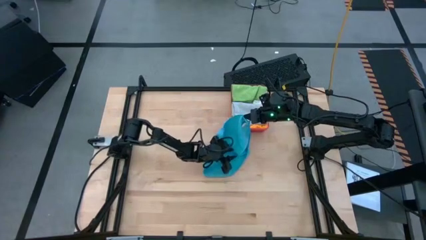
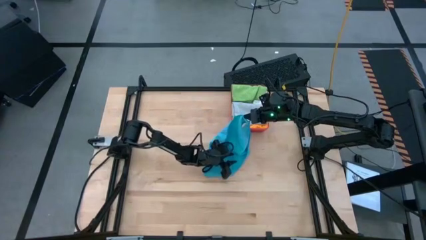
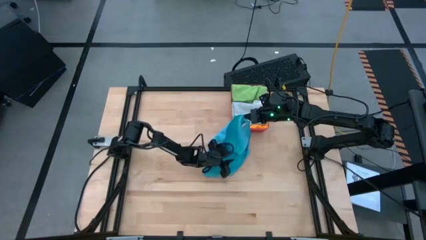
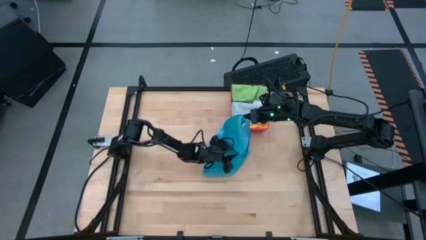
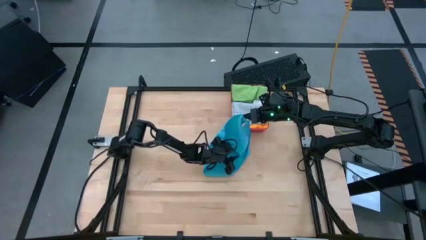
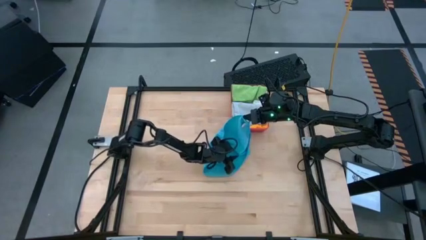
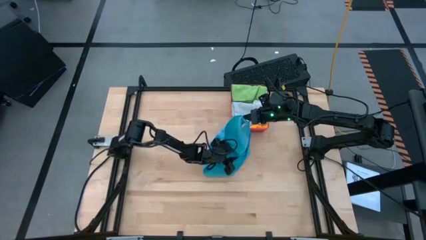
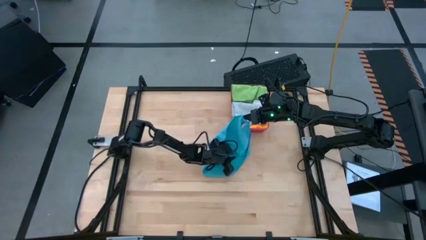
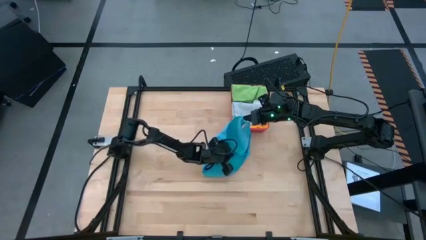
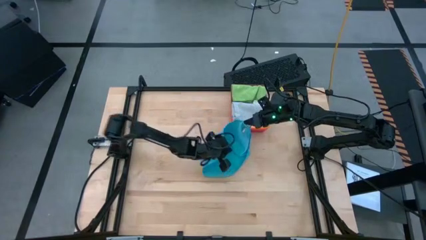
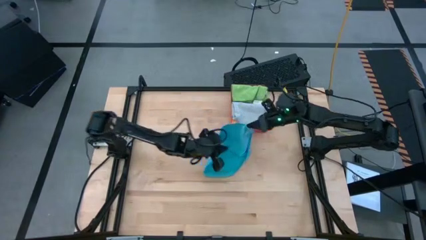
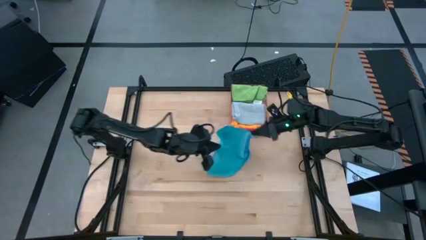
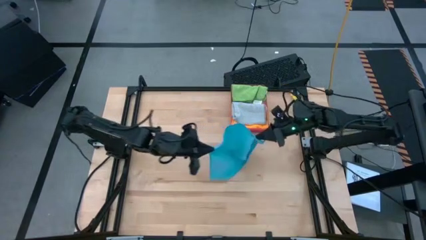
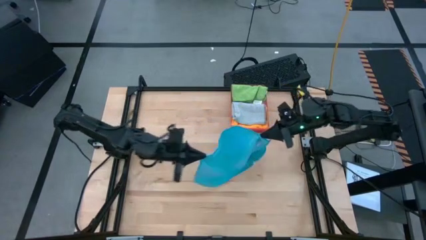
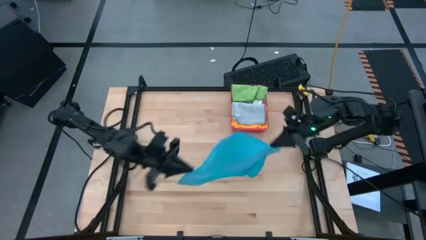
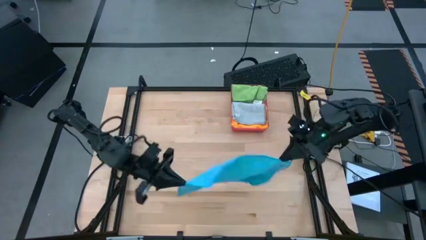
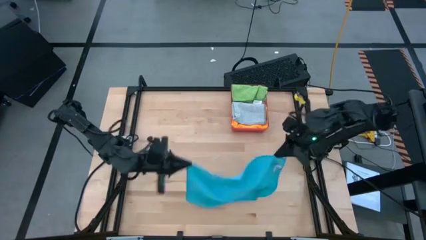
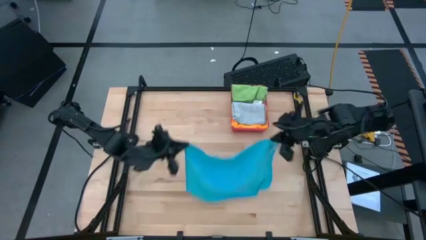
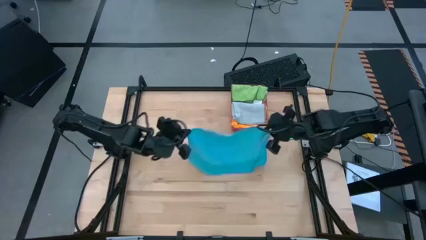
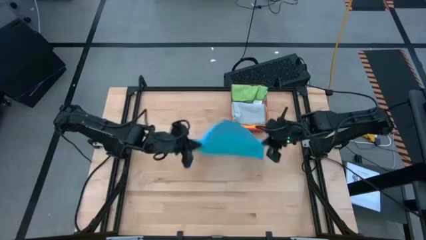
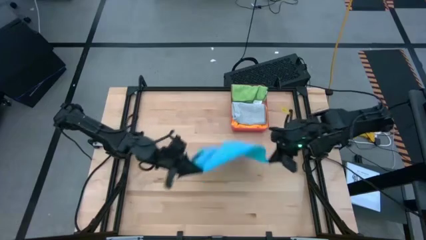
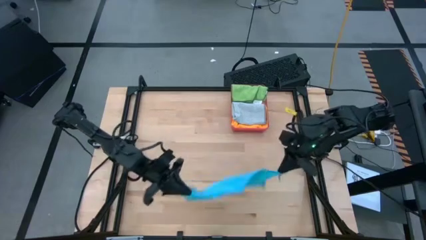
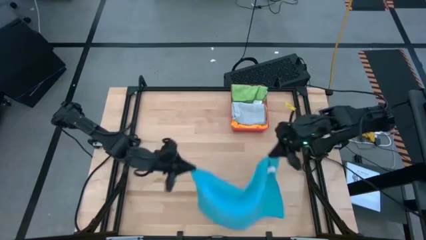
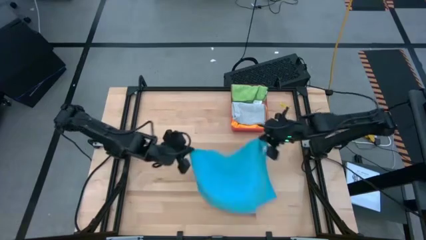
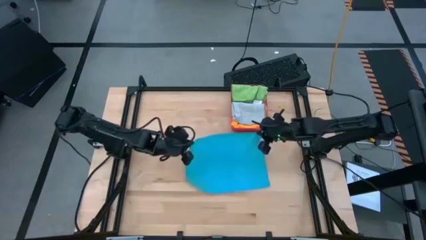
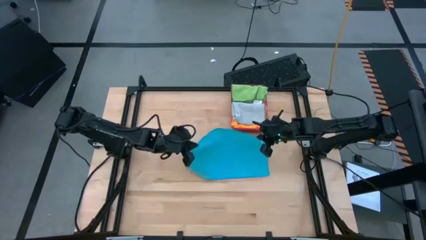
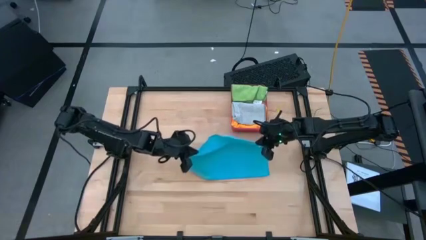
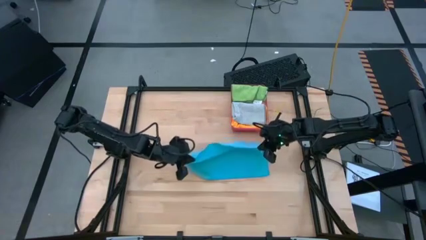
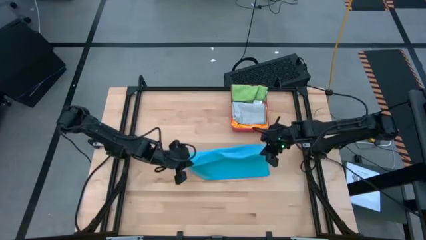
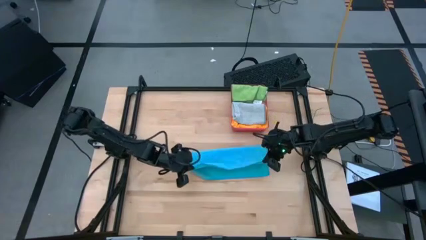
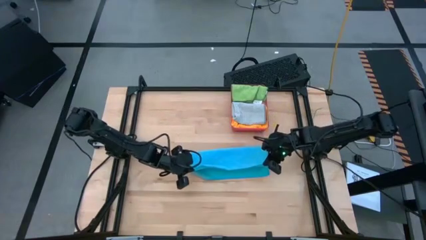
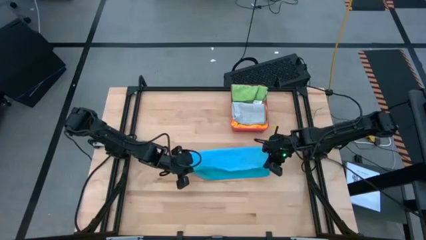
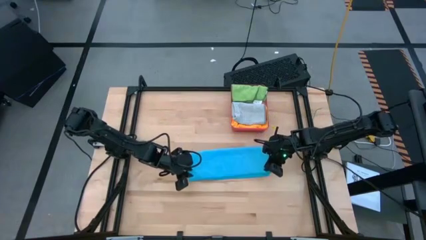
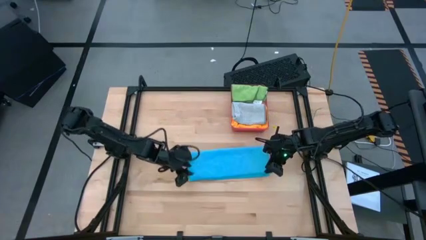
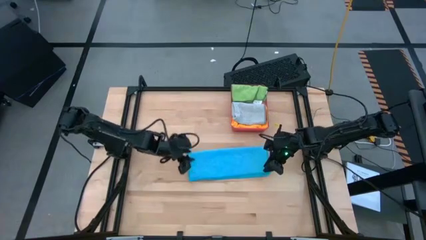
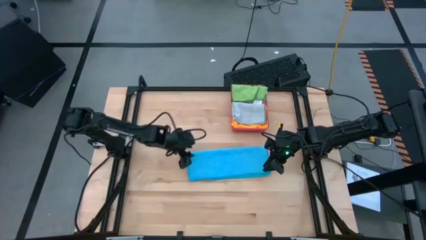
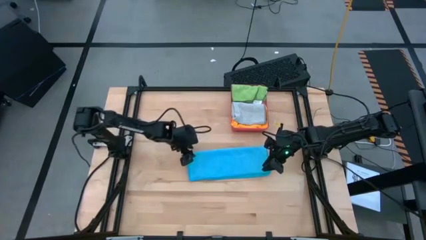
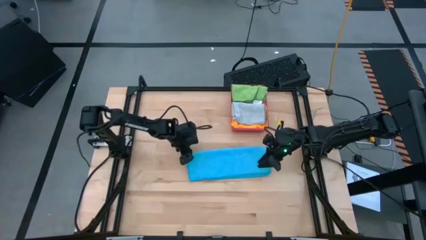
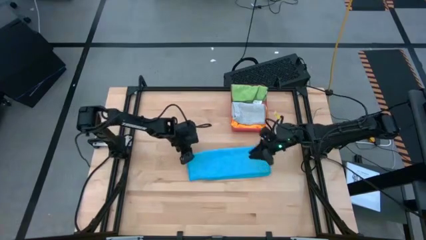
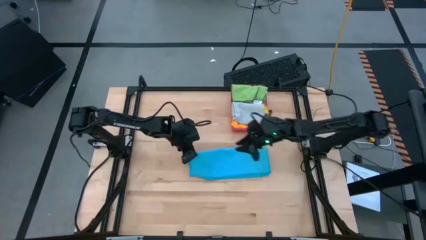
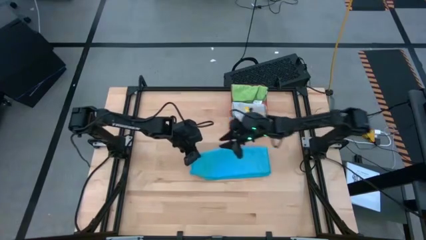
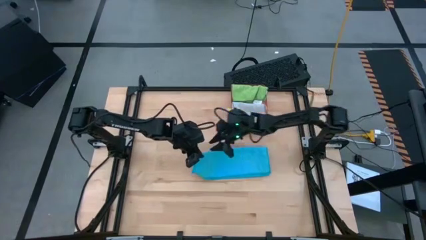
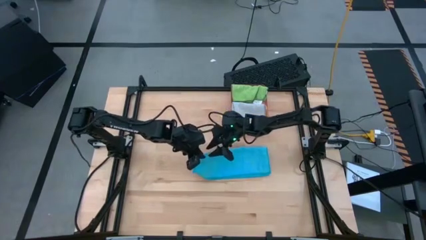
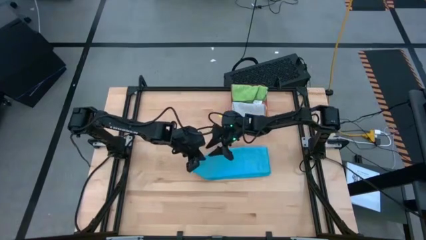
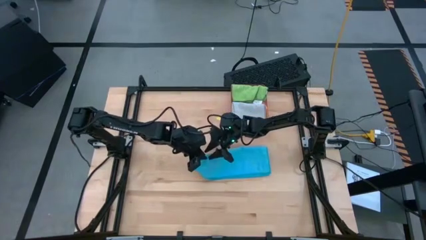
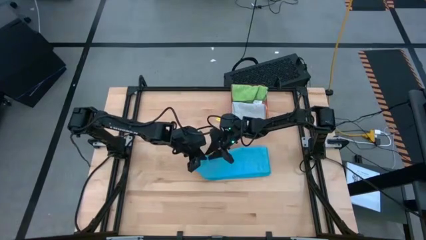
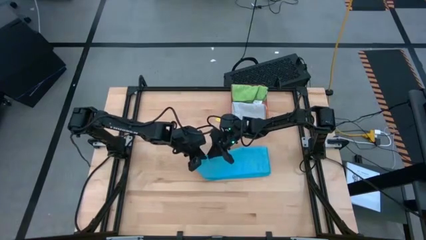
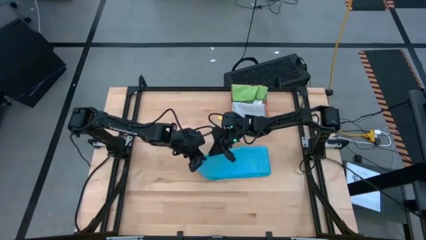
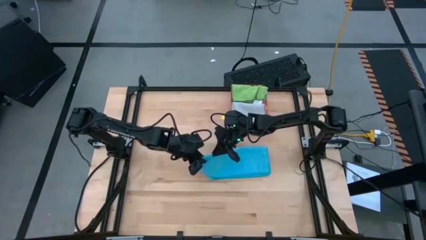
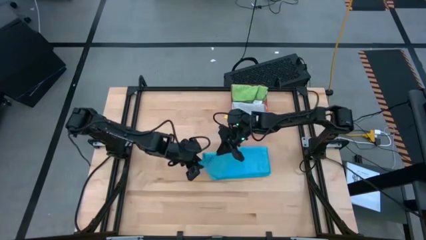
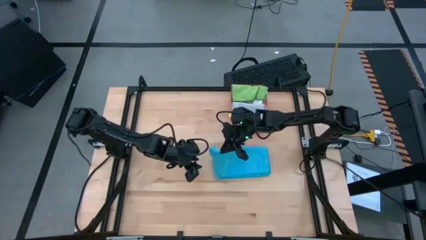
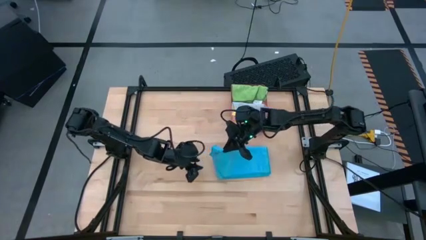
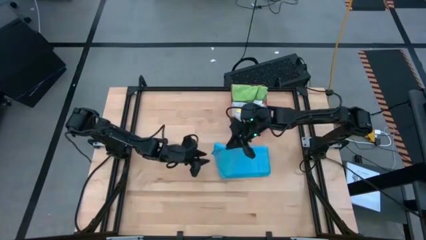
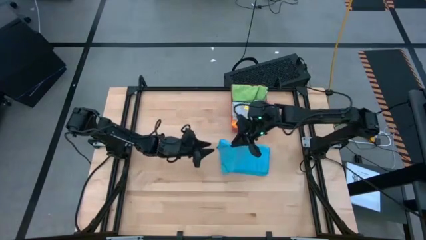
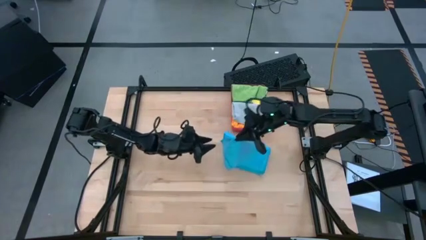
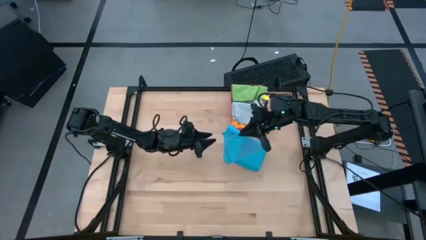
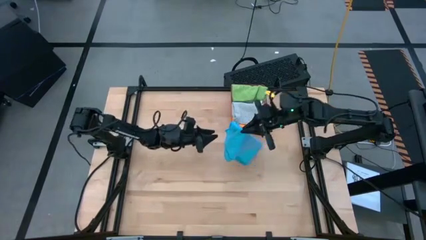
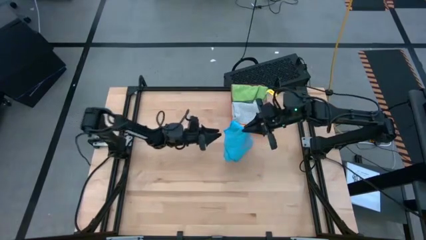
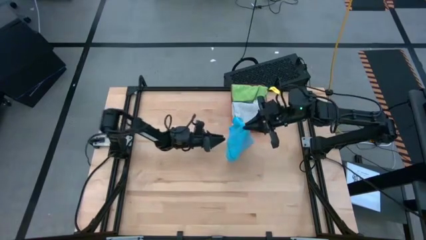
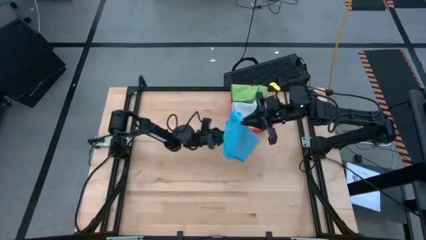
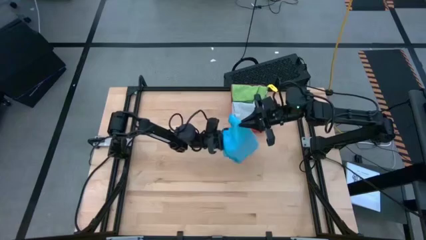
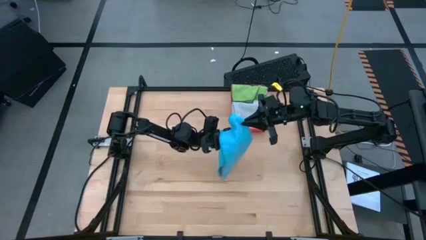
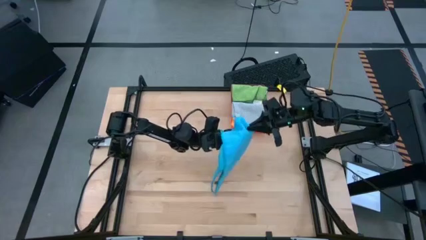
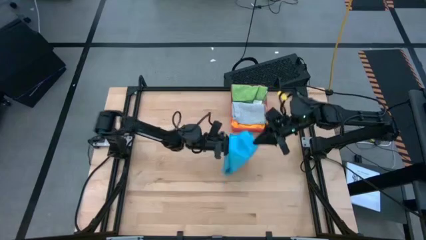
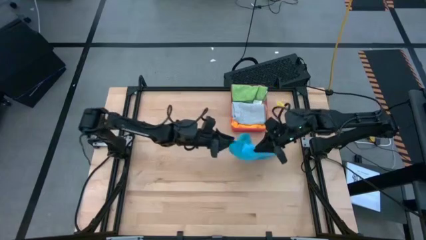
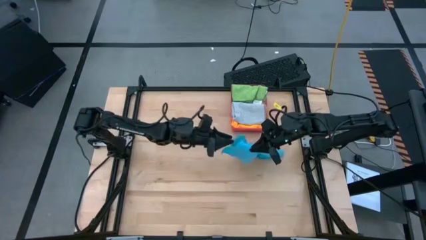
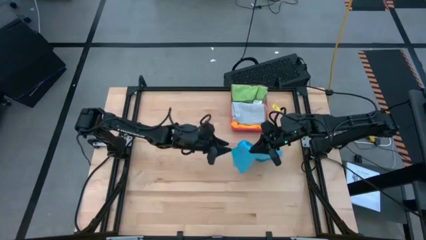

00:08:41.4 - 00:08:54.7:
Task: Fold microfiber towels
Fold the blue microfiber cloth

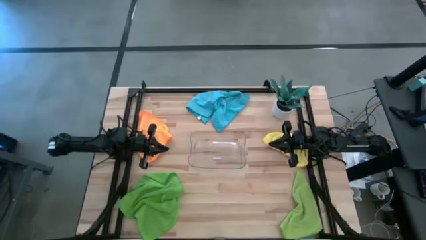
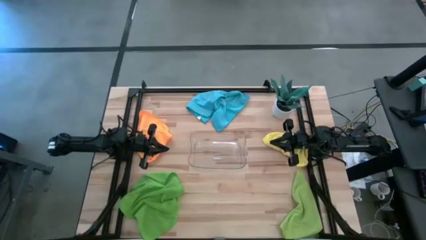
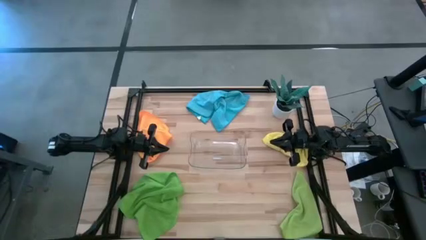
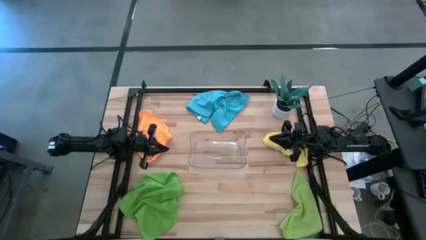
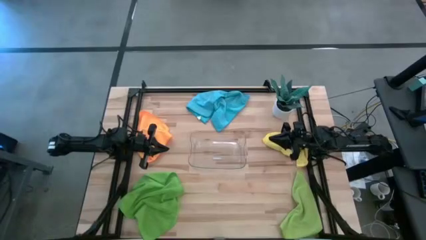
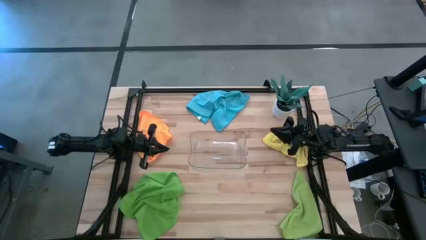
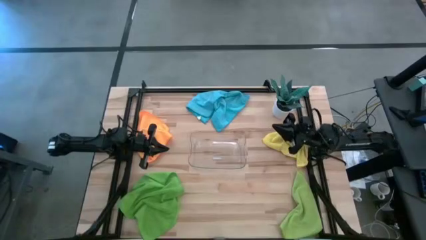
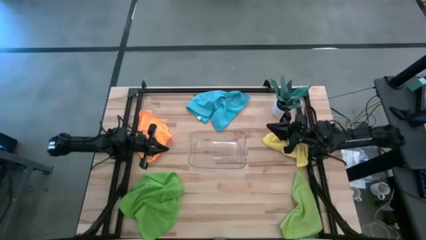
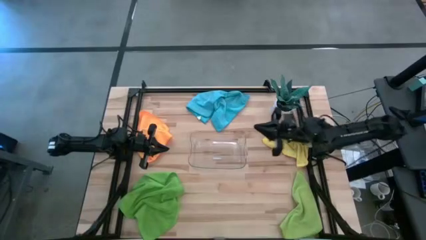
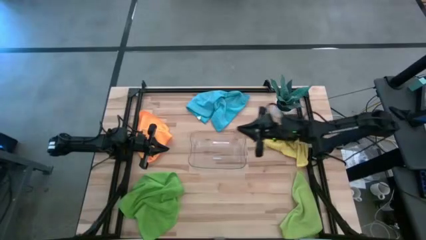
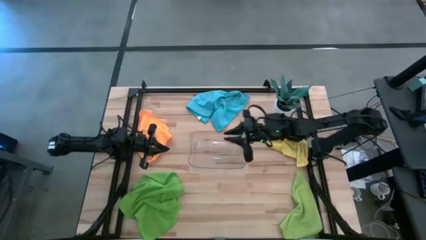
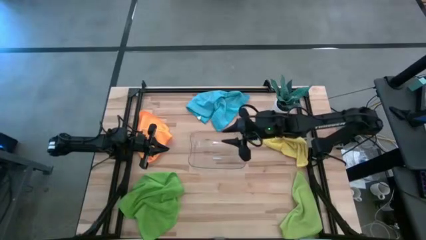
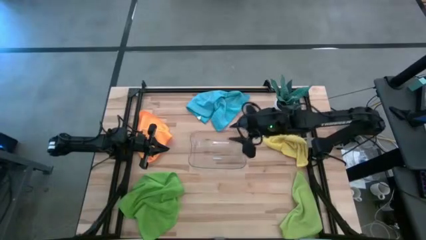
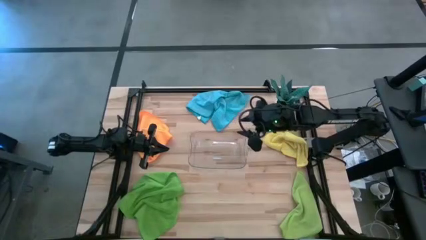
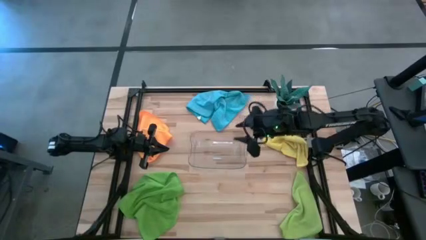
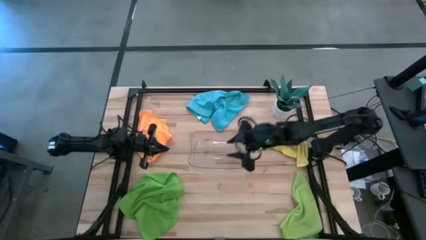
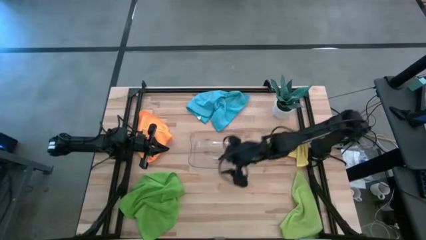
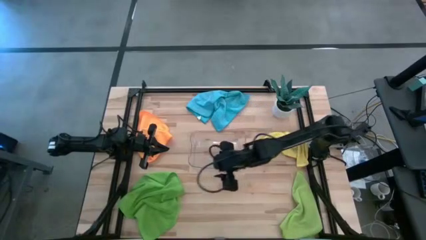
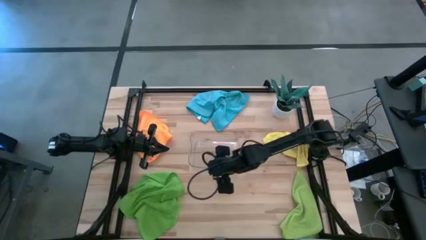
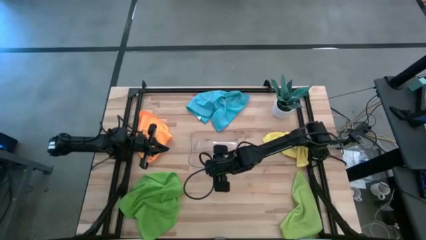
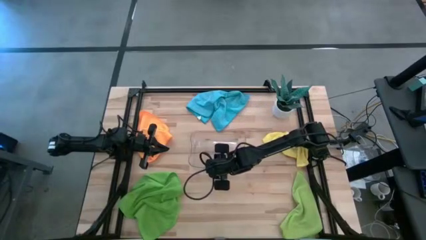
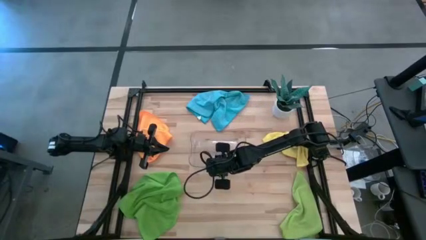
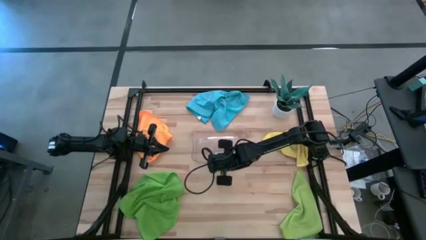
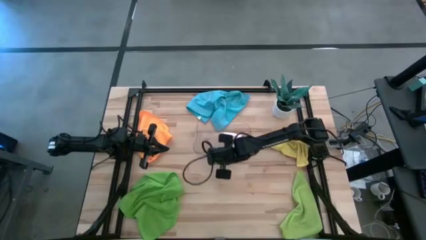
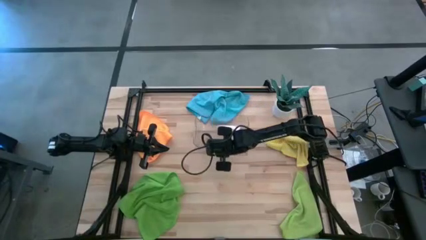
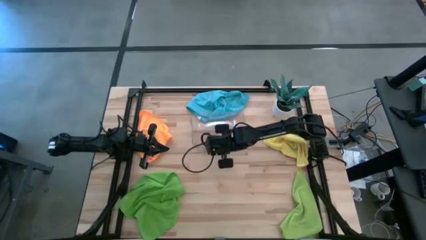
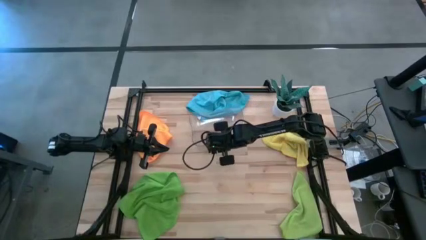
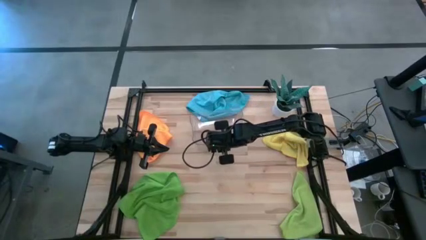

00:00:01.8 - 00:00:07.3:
Task: Fold microfiber towels
Move the transparent bin
